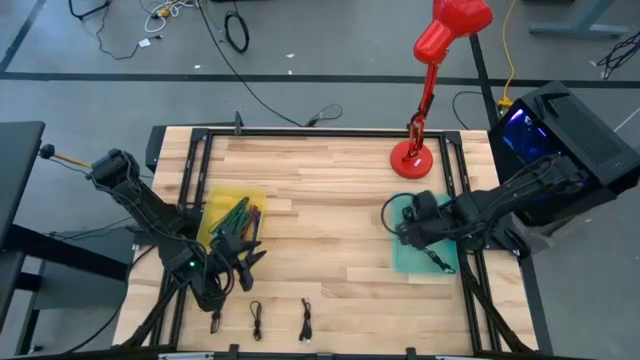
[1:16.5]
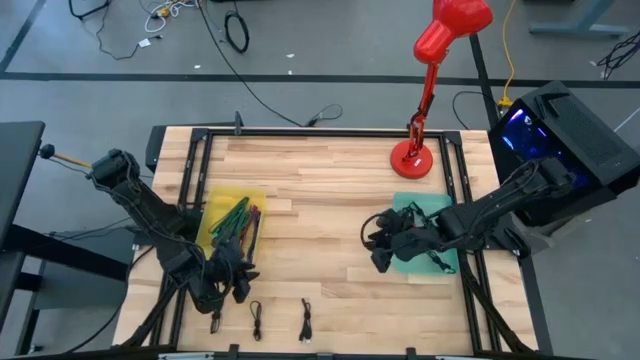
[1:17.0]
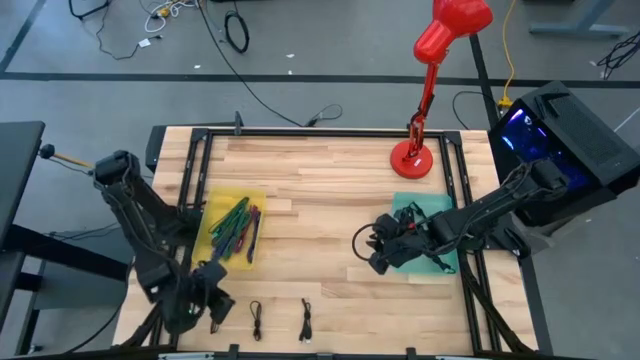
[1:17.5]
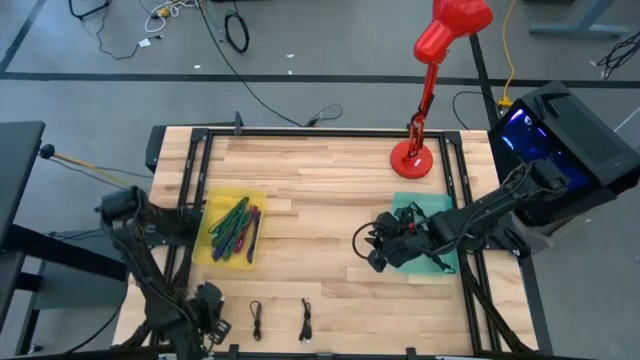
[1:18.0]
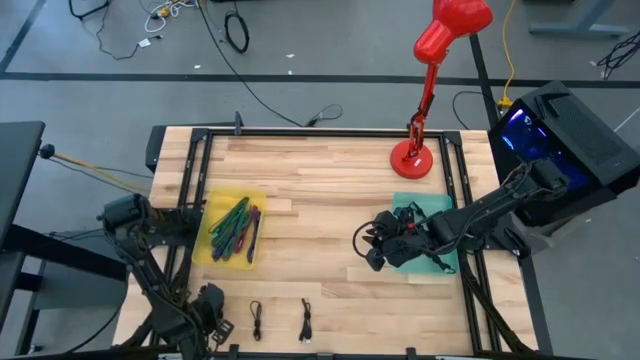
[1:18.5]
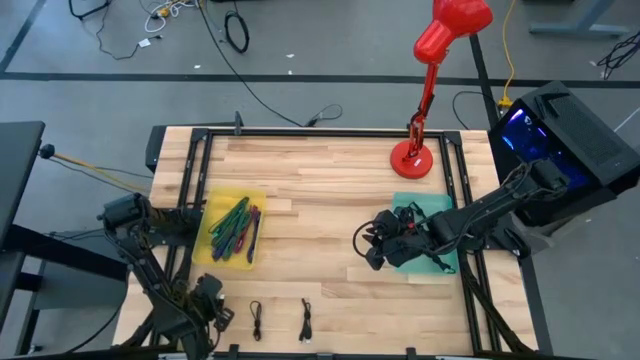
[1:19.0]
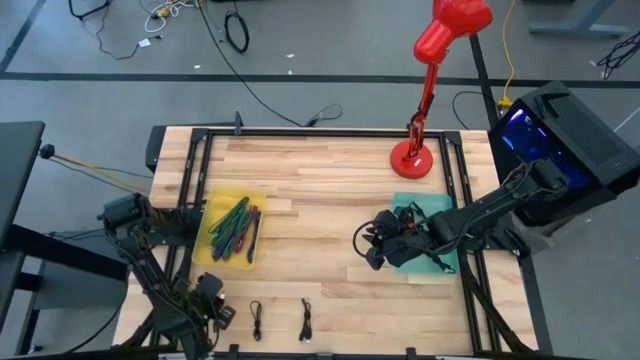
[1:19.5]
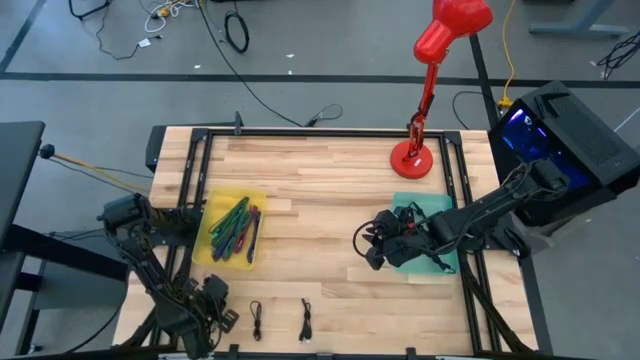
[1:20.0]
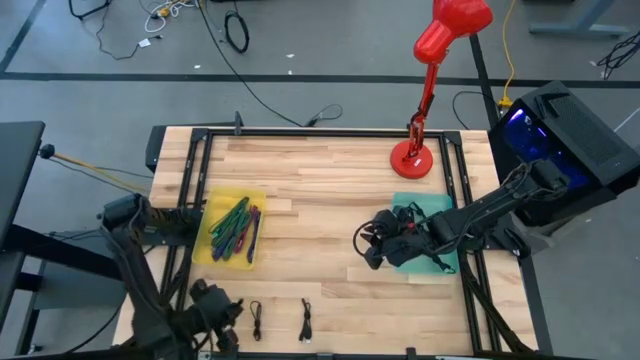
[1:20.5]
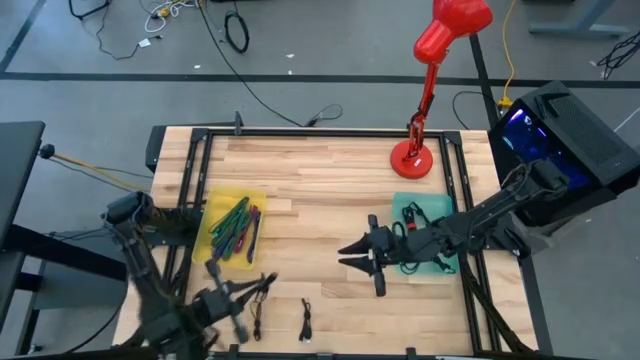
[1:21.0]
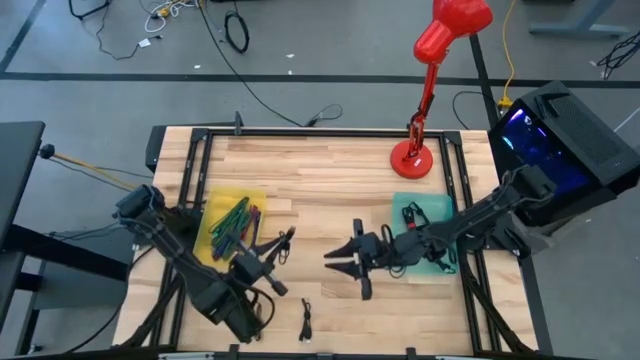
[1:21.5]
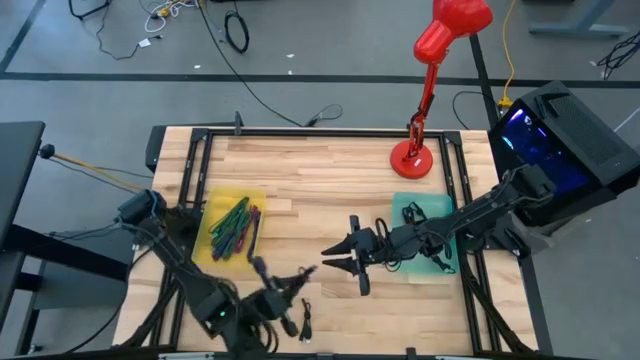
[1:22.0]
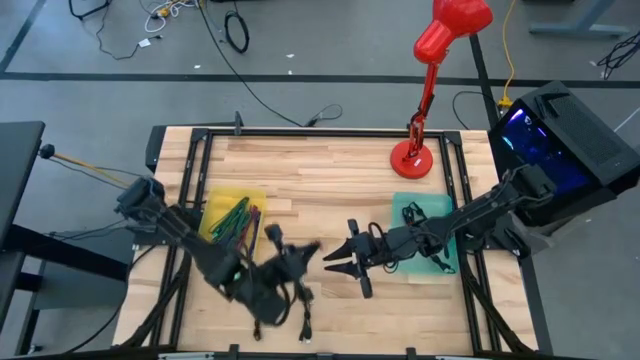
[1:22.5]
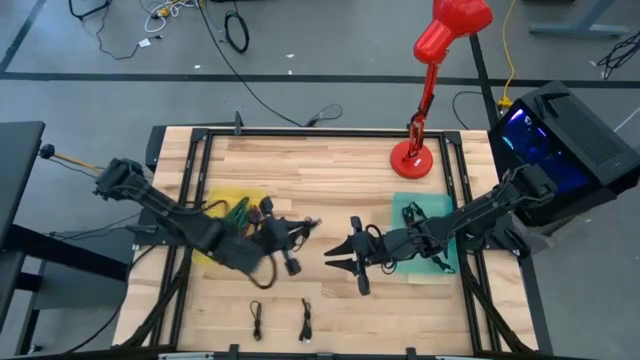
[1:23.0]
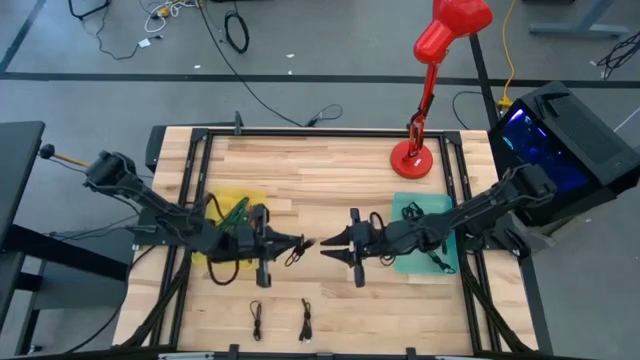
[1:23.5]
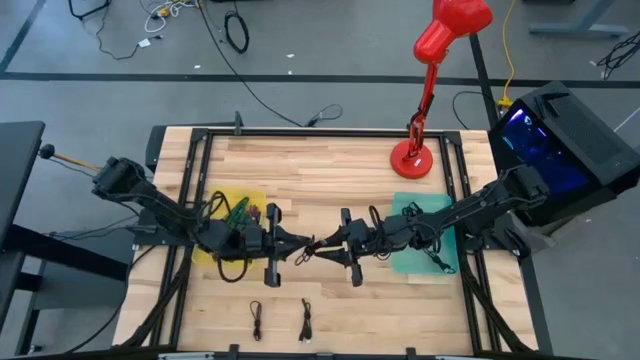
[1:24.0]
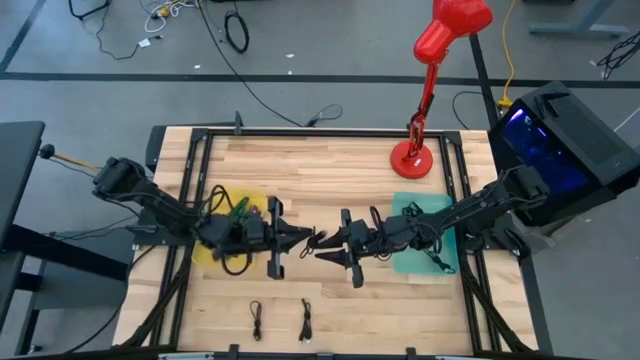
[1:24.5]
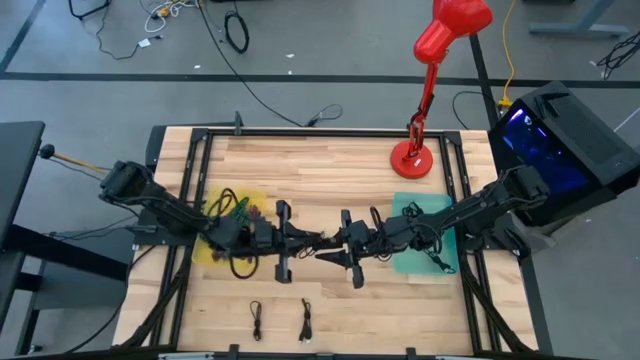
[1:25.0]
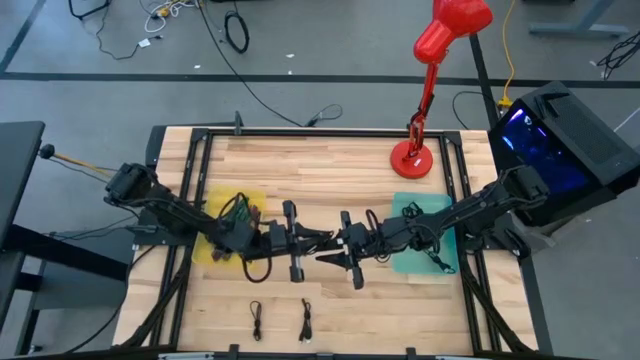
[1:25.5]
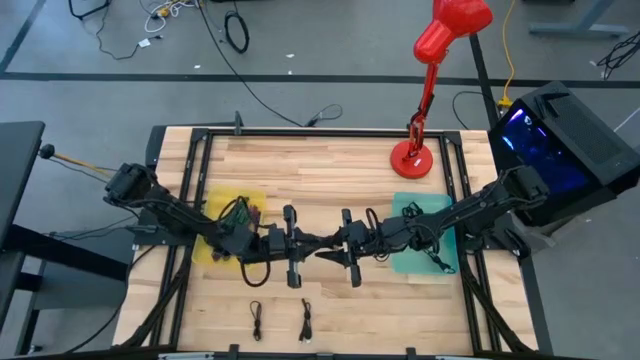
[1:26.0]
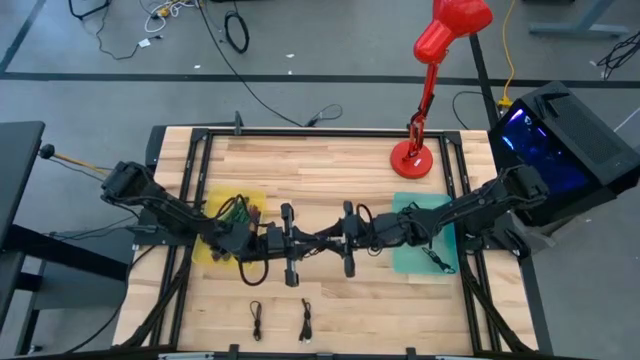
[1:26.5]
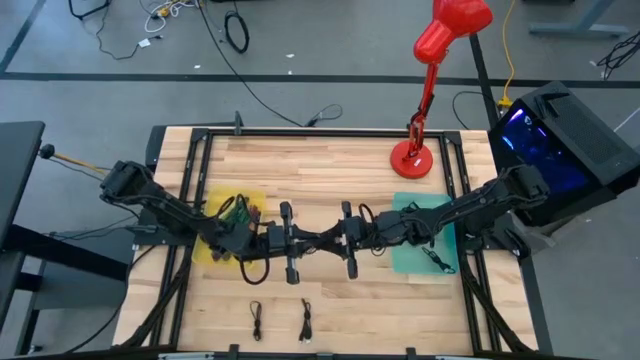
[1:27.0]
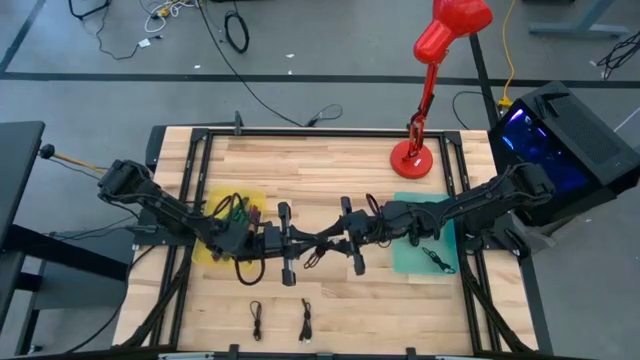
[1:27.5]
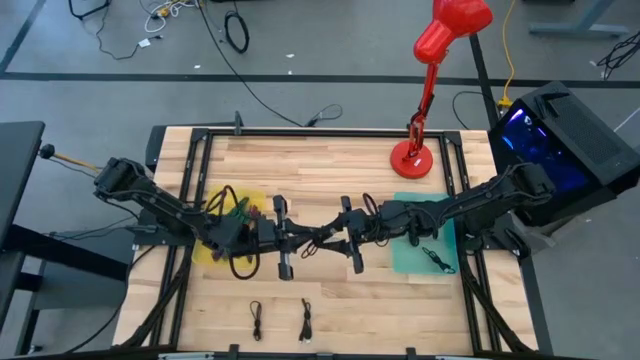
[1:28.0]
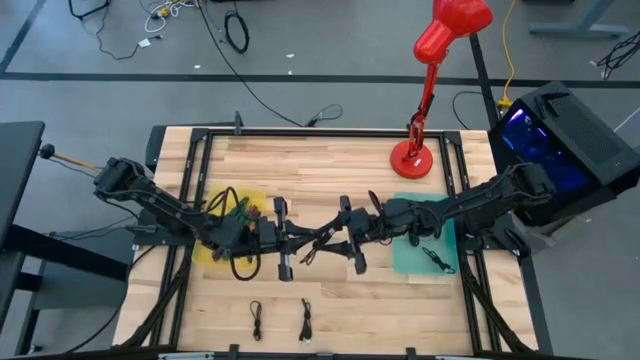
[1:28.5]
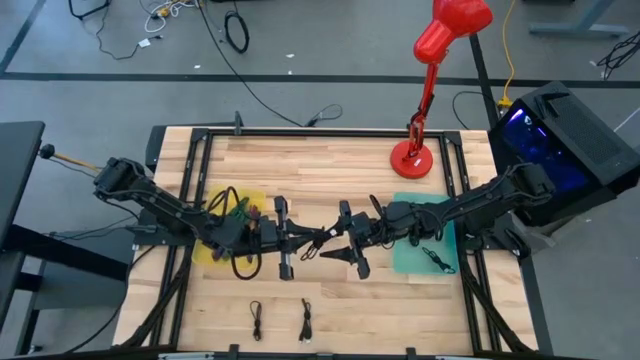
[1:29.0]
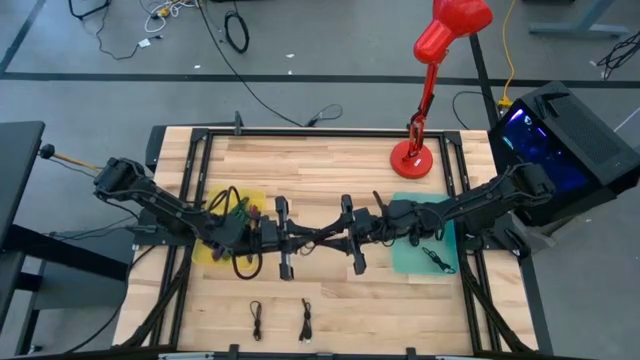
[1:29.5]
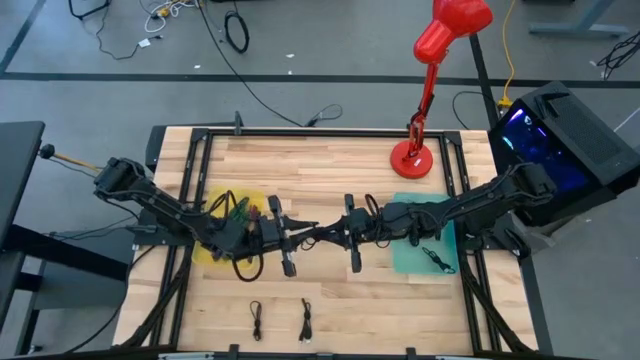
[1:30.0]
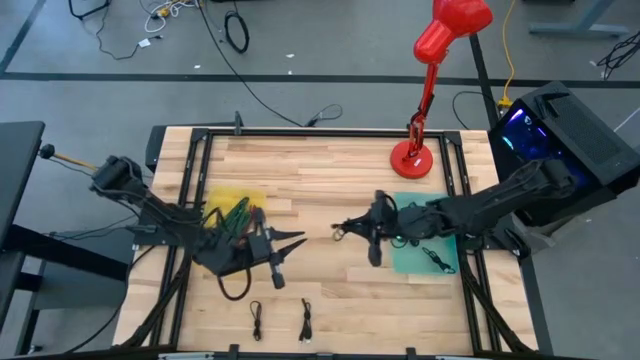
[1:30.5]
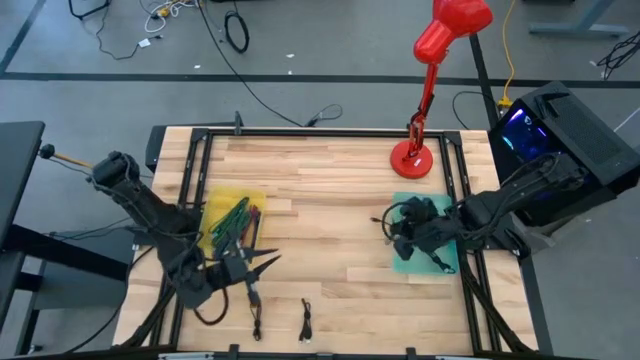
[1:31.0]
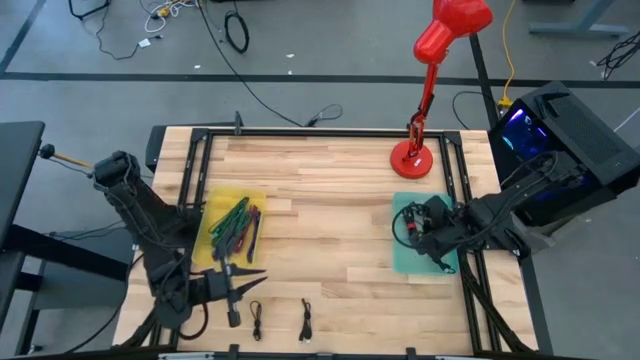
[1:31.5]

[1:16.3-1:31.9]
Task: Pick & Place USB Port
Put the black charger cable into the green bin

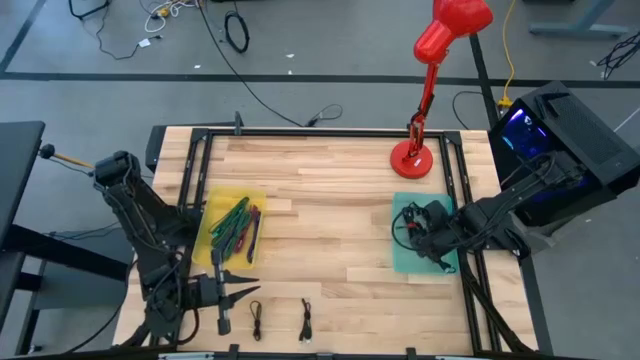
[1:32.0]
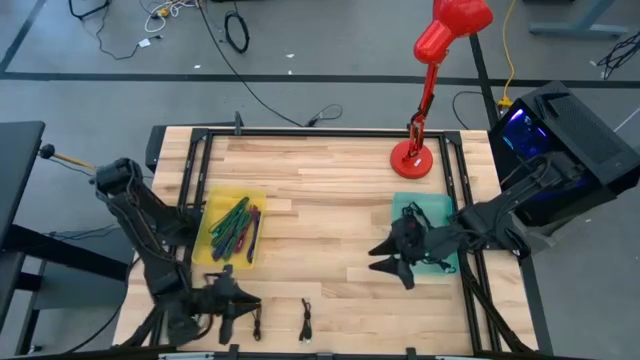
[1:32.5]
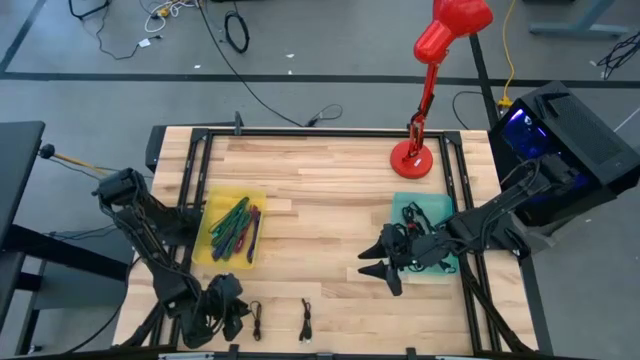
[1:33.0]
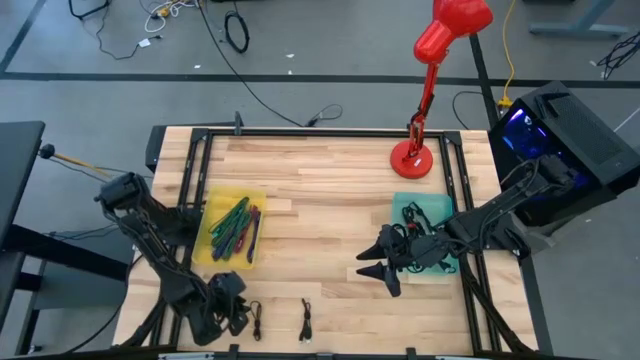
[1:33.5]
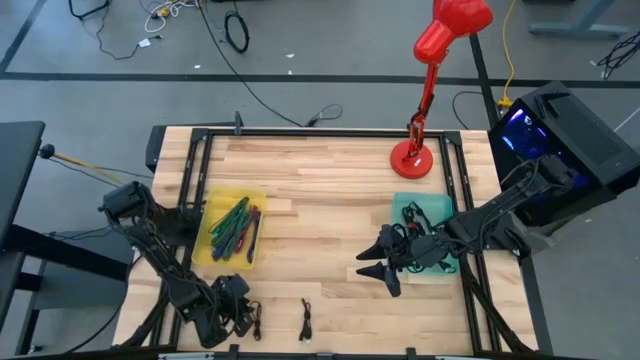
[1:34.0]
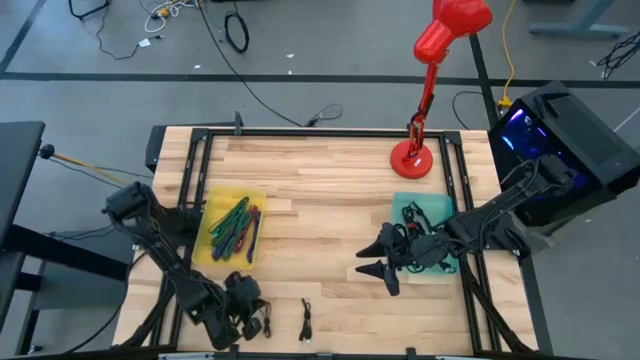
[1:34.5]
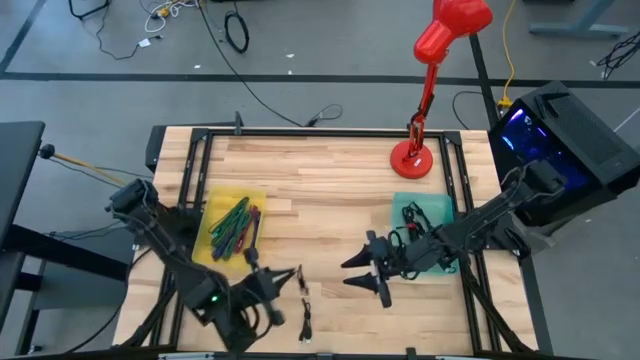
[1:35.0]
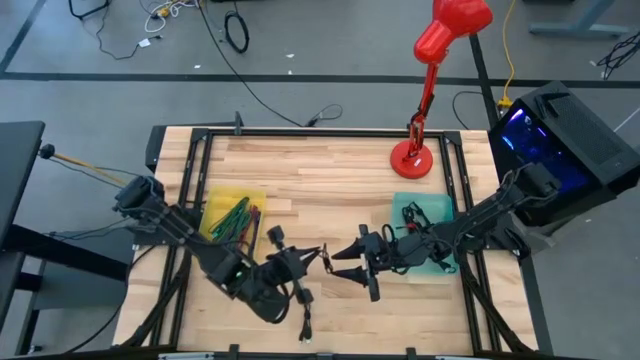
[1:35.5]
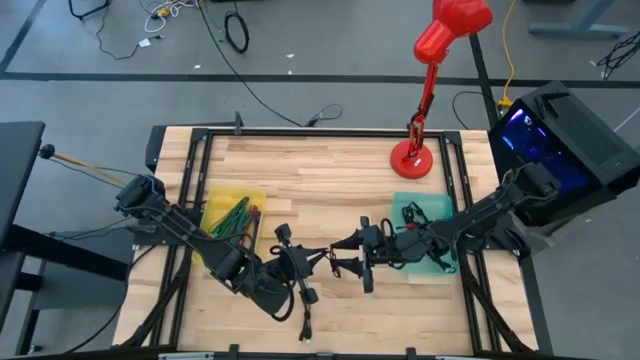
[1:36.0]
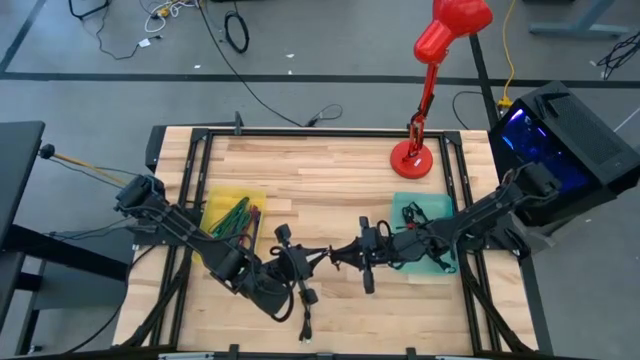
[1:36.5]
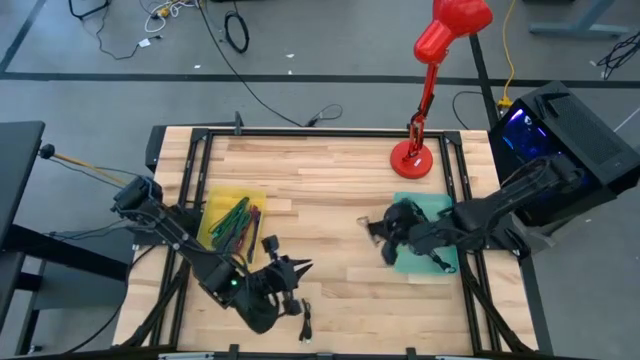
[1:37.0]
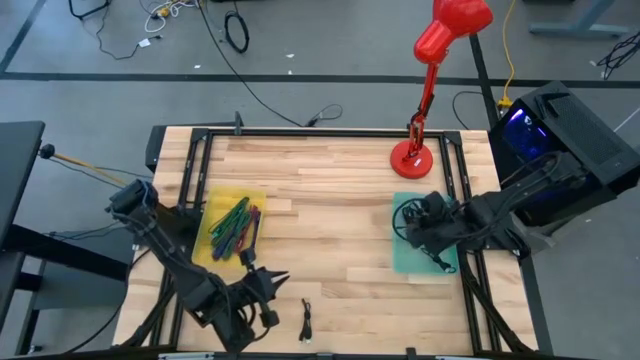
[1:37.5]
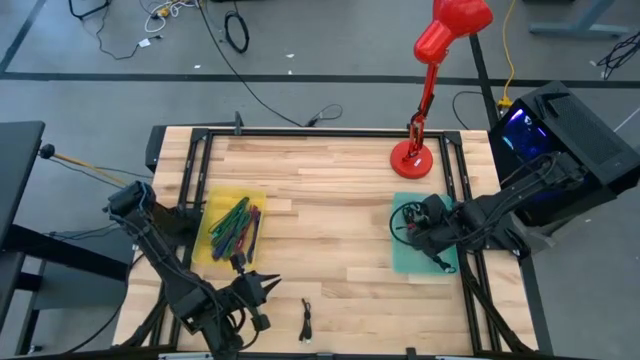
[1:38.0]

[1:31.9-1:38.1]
Put the black charger cable into the green bin
